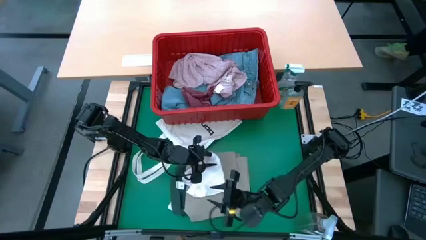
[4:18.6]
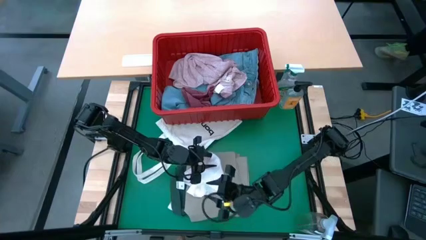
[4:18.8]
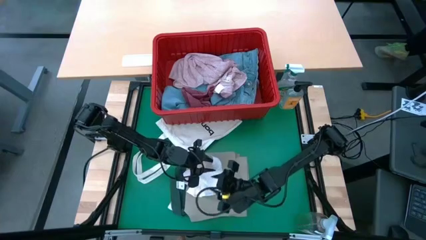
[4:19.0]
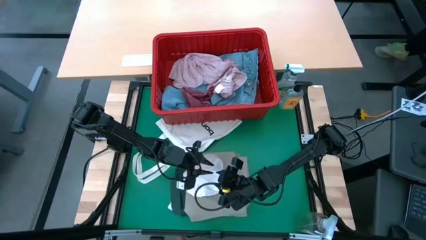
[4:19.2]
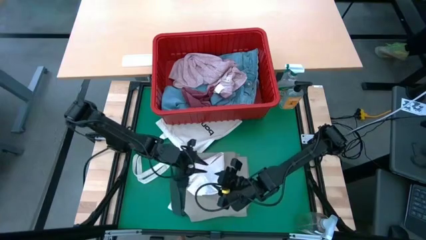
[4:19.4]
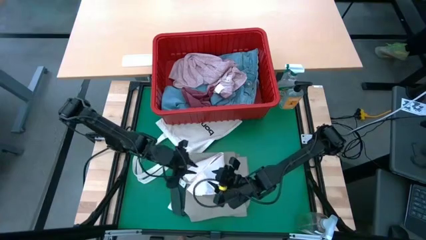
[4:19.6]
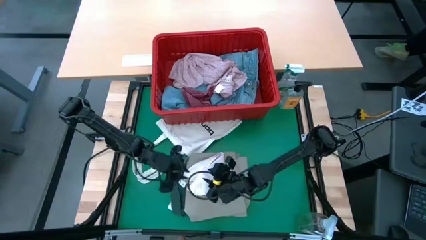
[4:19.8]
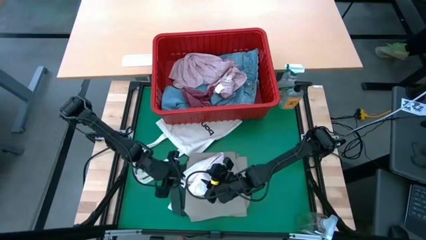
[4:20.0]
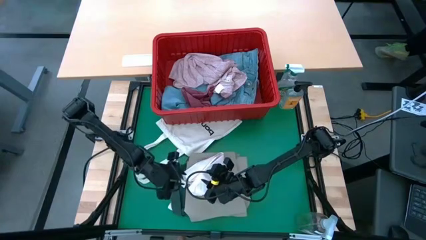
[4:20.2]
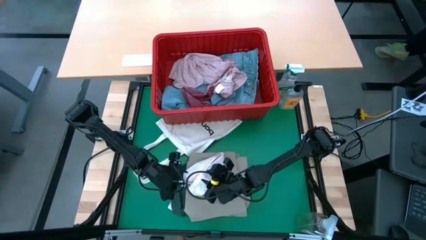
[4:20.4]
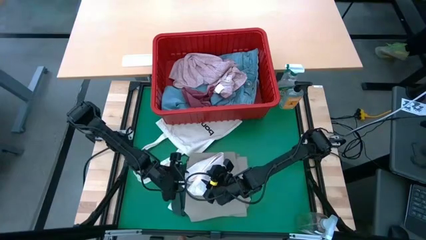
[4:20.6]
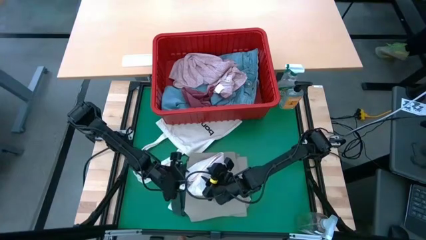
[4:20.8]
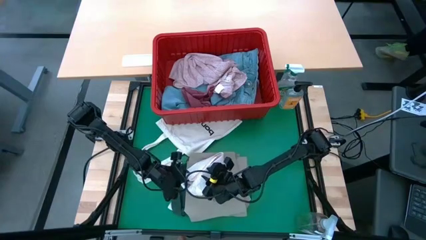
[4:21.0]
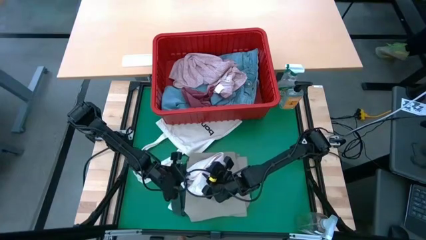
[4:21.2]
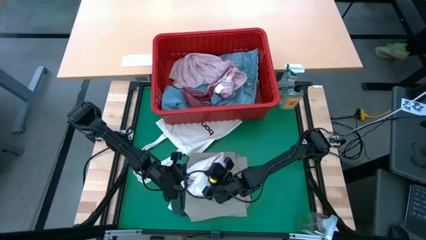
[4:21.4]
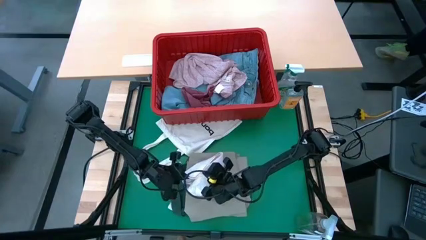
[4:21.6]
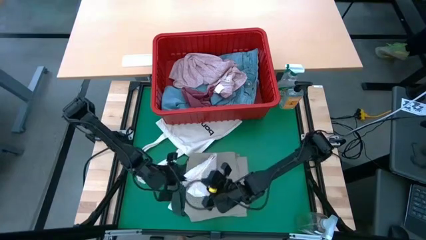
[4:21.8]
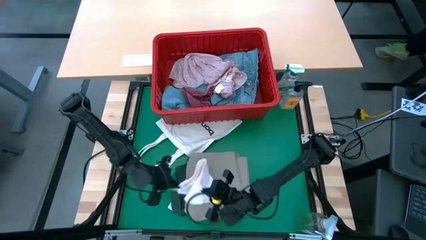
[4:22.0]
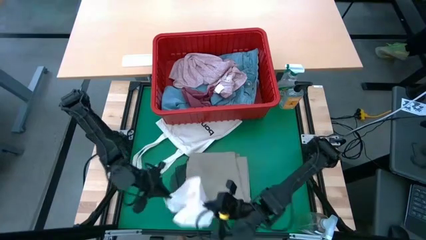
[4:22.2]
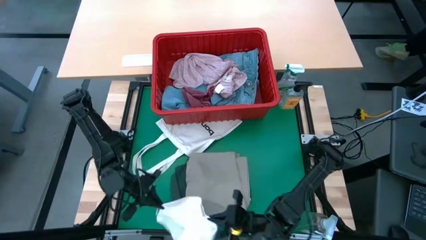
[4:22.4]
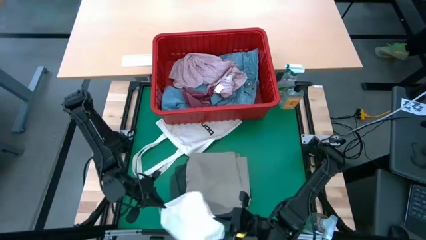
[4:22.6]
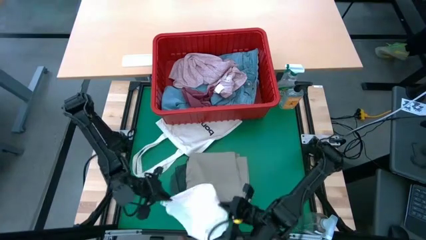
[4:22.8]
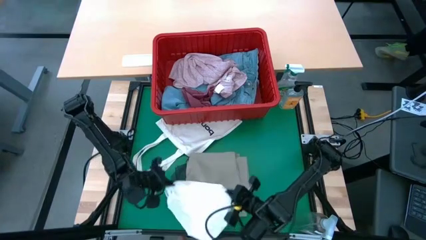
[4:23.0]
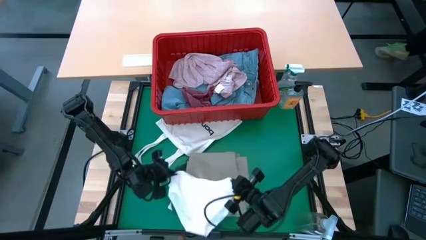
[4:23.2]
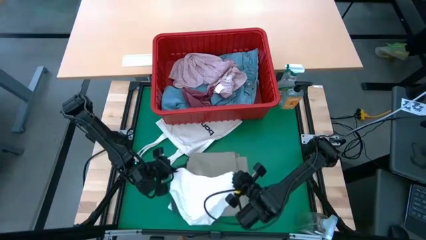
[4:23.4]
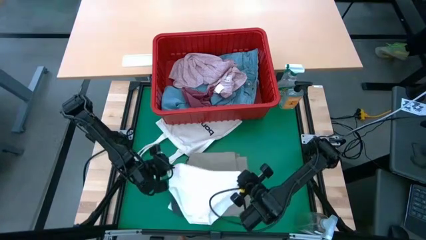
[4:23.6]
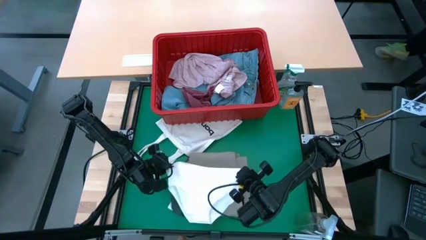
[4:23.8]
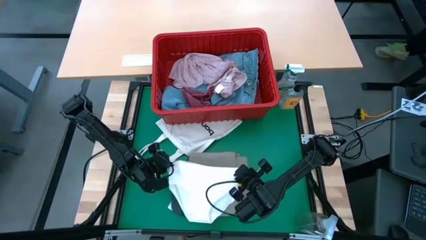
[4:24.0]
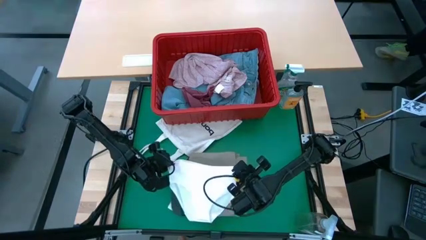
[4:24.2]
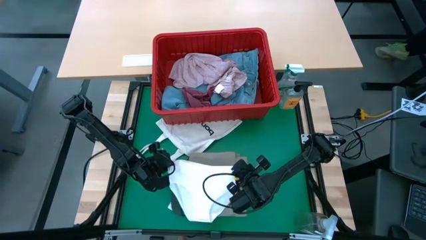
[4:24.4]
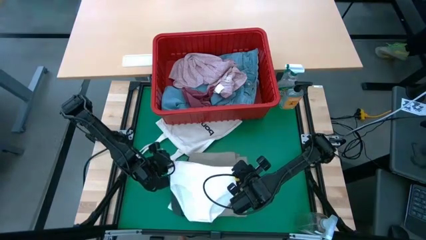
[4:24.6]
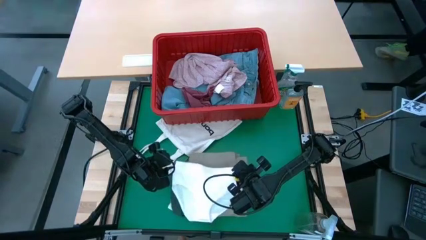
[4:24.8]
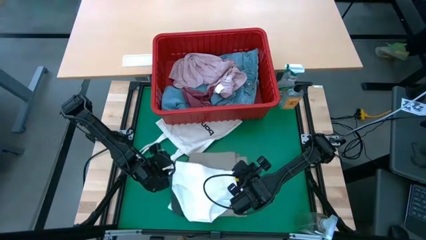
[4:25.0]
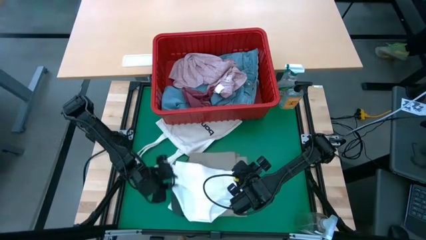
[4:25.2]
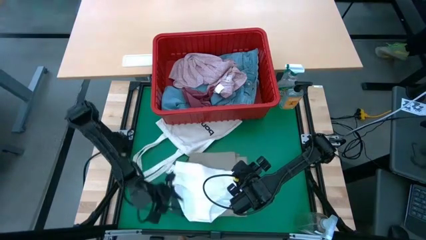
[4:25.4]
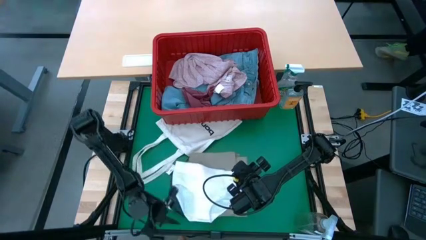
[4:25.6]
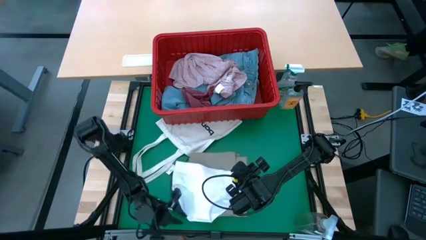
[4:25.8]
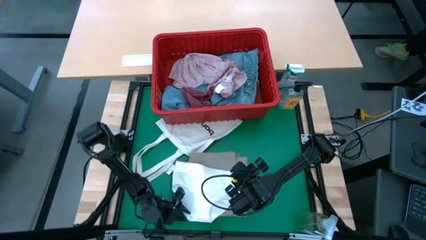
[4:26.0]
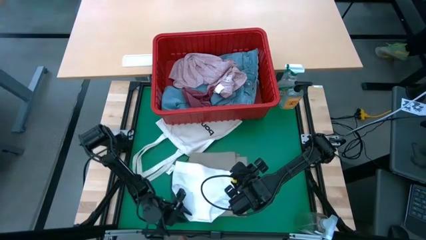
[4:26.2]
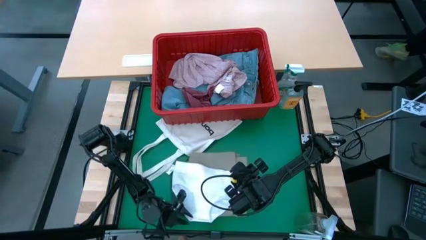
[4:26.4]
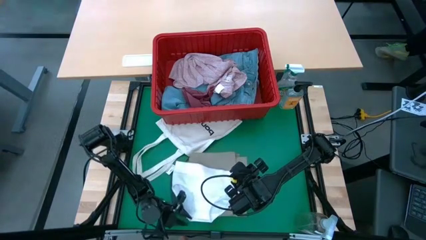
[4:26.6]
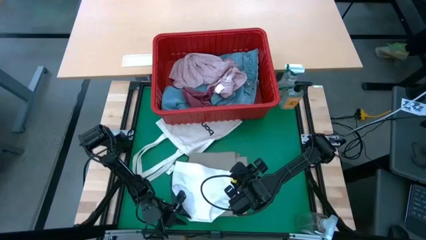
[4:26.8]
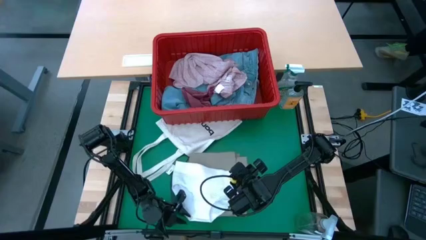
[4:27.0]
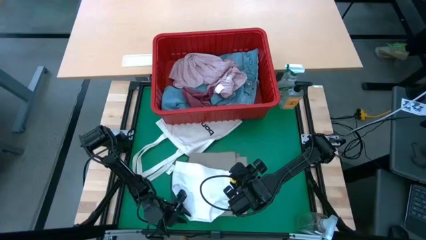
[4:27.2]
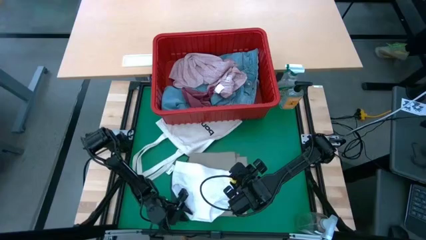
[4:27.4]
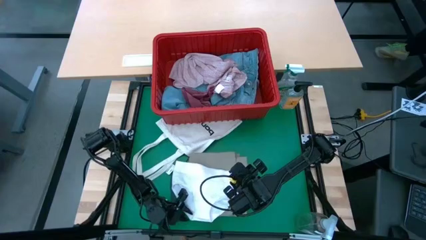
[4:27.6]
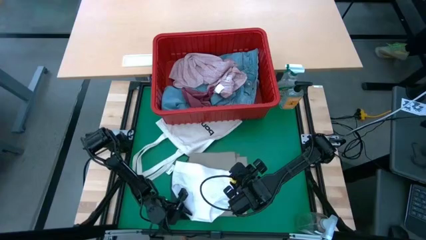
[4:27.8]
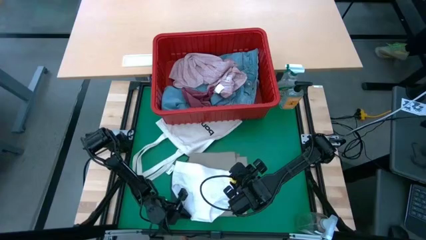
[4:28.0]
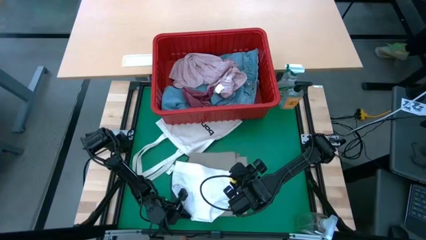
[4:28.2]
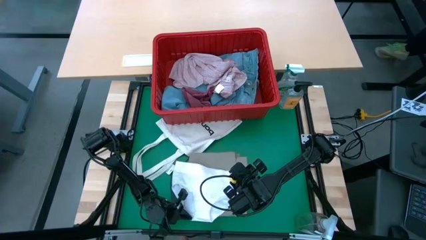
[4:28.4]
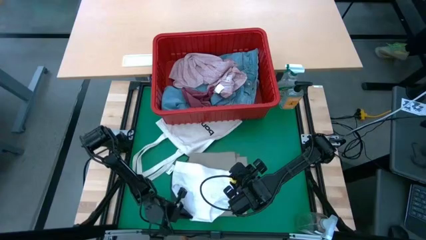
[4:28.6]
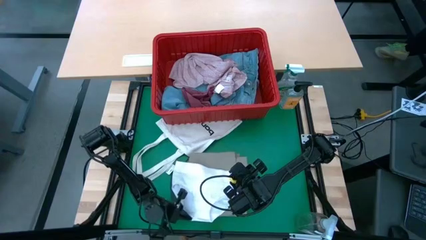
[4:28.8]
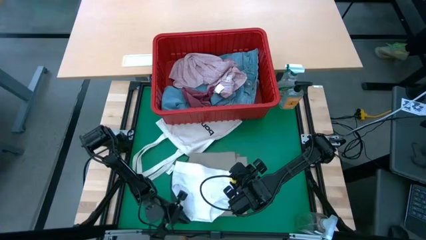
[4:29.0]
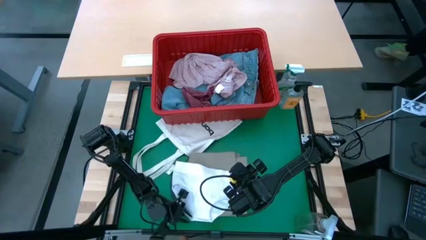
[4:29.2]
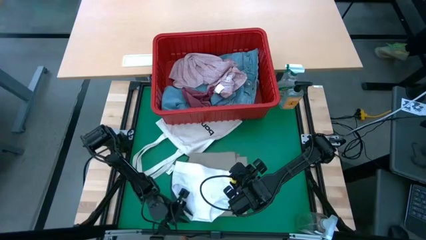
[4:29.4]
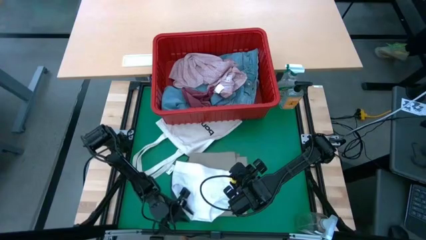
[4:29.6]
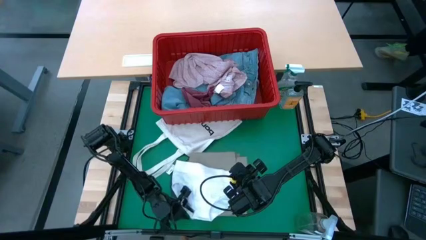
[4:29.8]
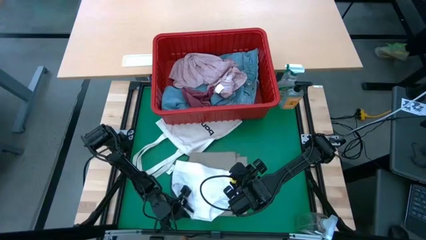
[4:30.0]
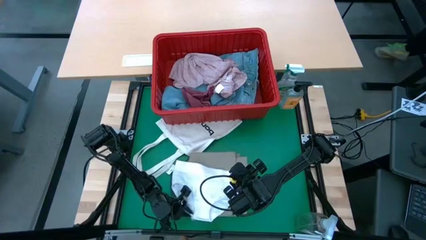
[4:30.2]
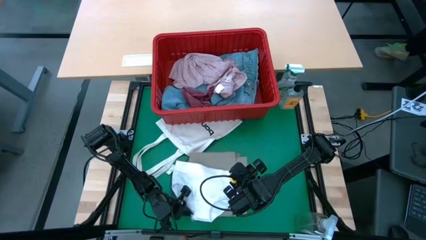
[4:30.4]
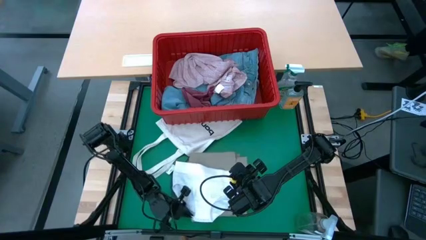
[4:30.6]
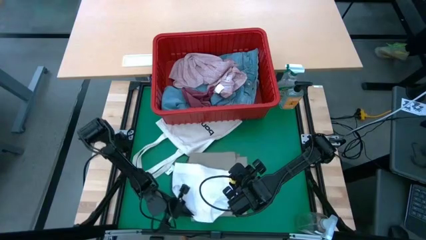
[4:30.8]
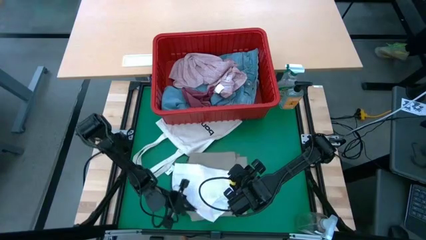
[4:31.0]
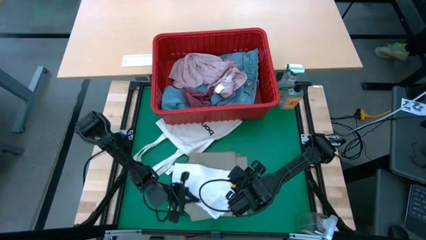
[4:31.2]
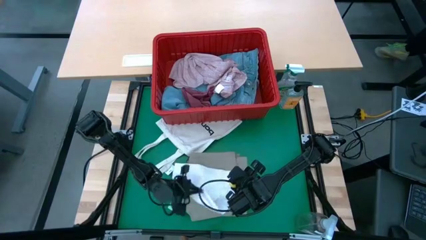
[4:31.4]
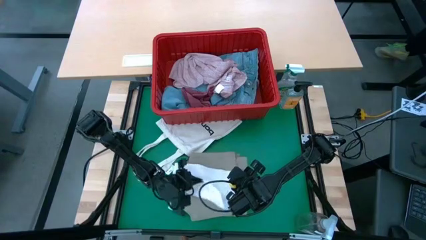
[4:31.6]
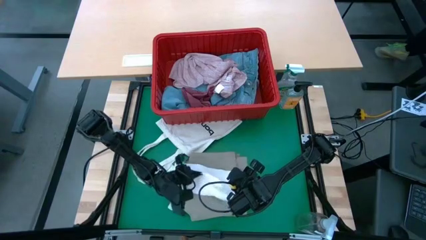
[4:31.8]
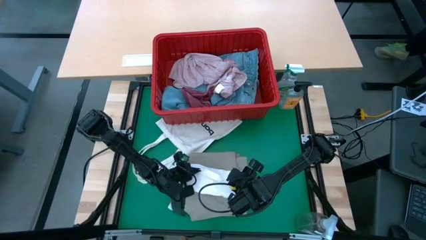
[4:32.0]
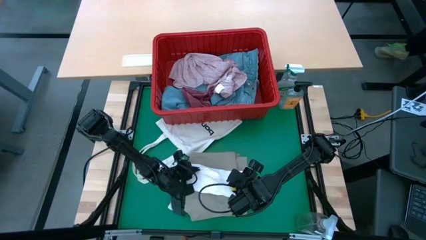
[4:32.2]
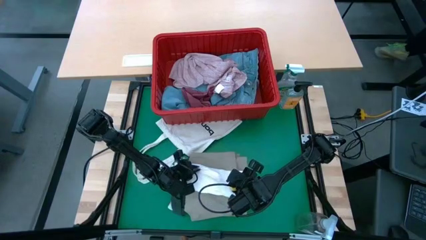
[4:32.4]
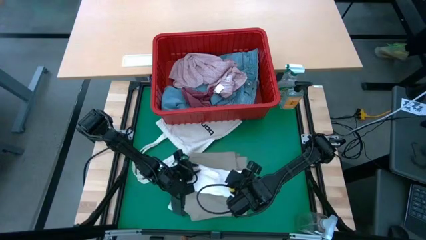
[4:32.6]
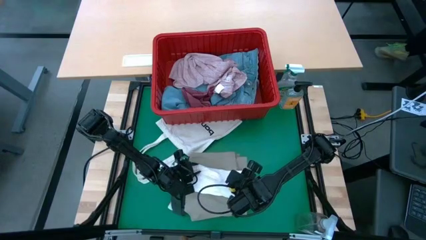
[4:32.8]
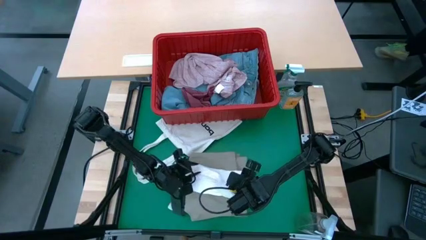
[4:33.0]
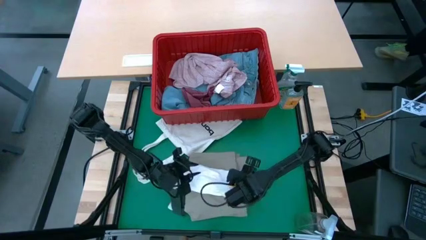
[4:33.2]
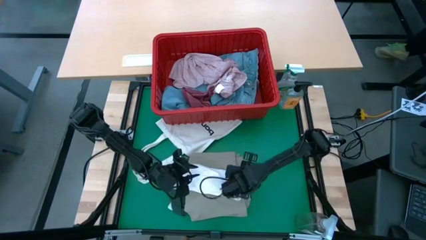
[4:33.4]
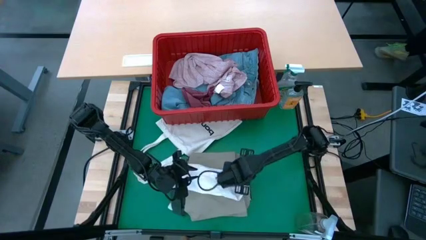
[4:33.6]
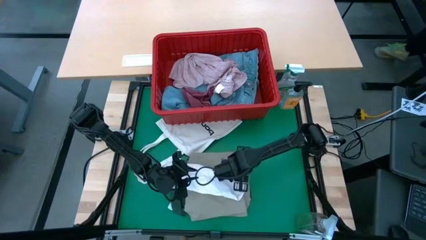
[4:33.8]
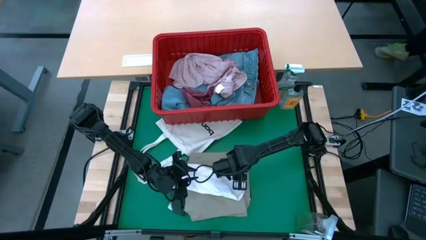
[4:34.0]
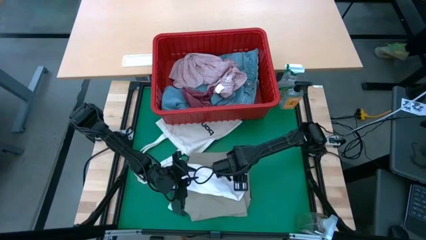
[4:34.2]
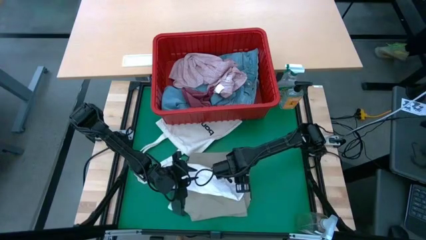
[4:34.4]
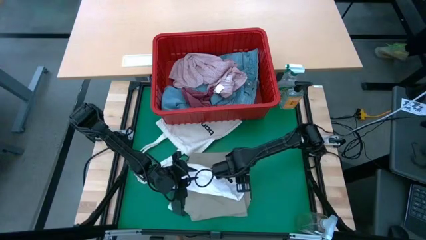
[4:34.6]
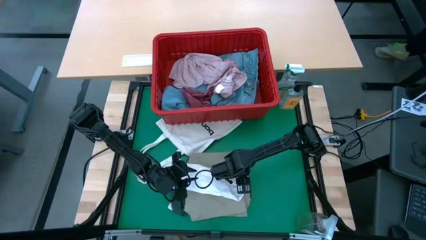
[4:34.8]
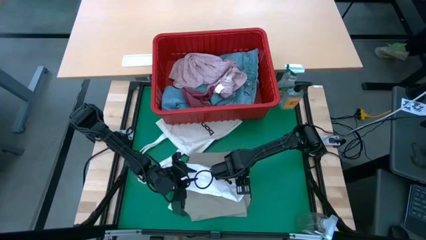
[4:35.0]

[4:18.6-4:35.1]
Task: Fold laundry
Fold the pink panty
